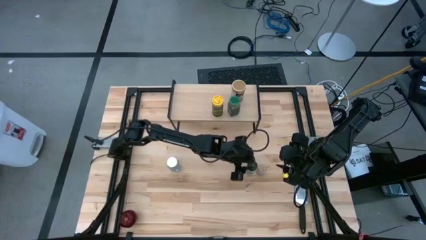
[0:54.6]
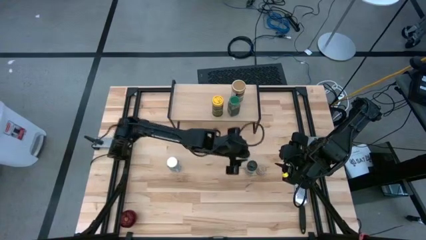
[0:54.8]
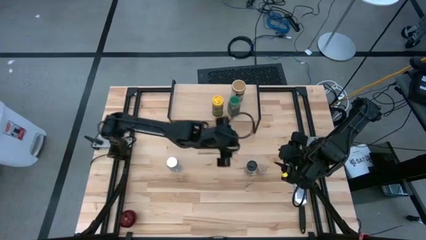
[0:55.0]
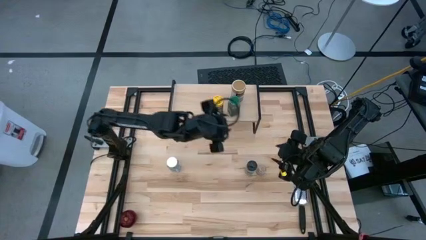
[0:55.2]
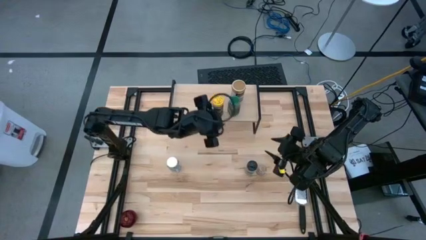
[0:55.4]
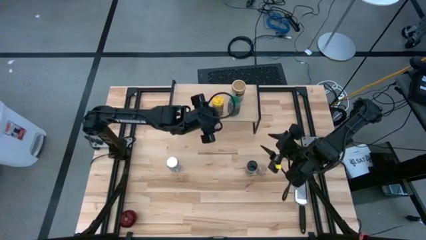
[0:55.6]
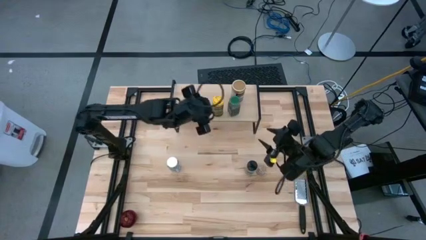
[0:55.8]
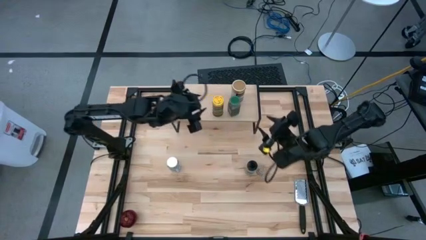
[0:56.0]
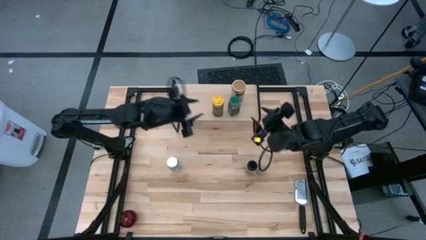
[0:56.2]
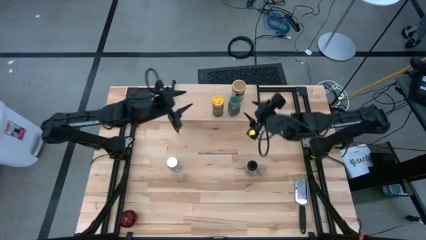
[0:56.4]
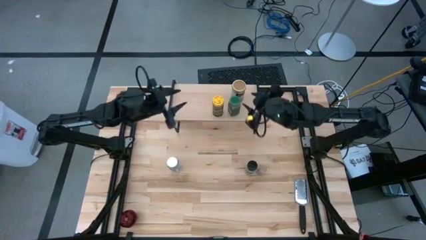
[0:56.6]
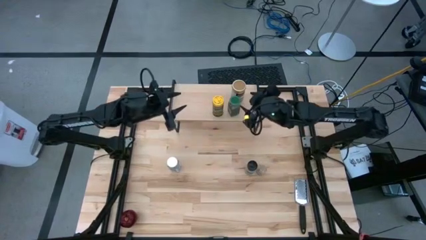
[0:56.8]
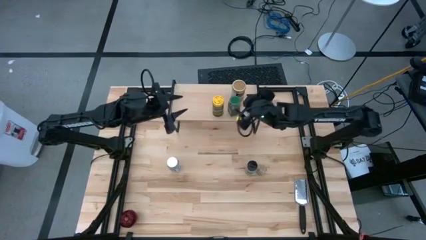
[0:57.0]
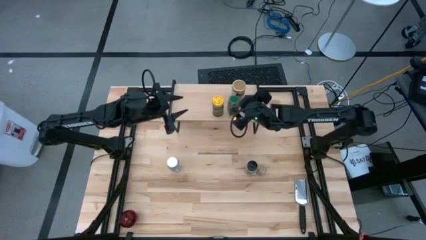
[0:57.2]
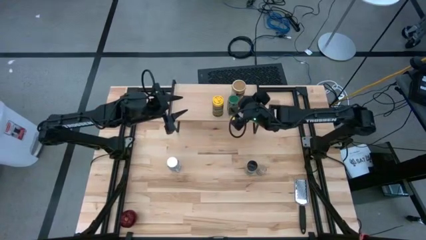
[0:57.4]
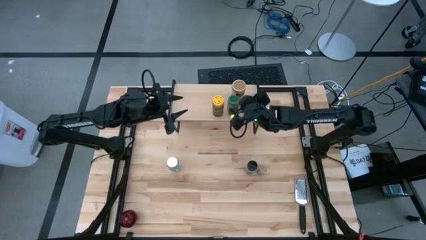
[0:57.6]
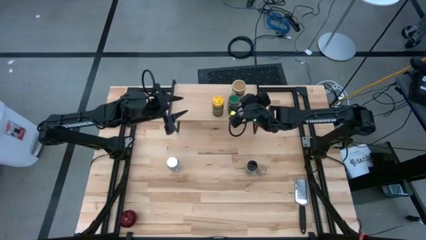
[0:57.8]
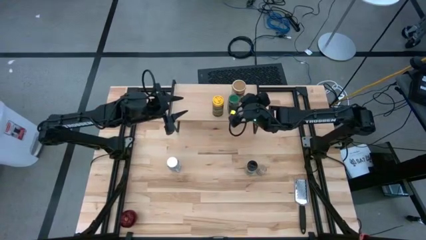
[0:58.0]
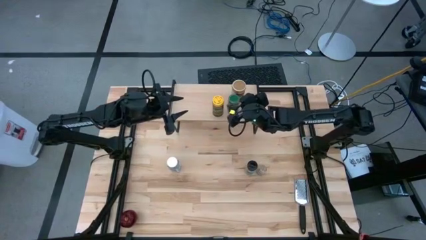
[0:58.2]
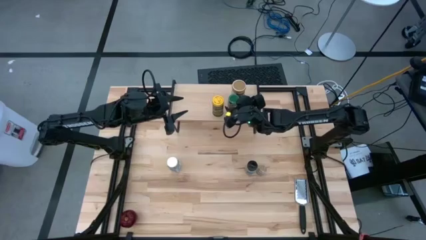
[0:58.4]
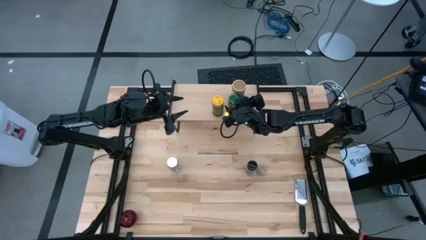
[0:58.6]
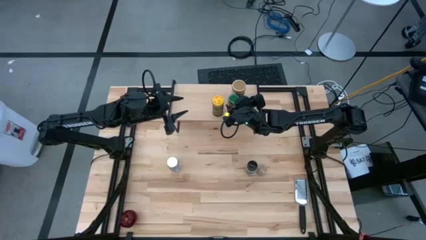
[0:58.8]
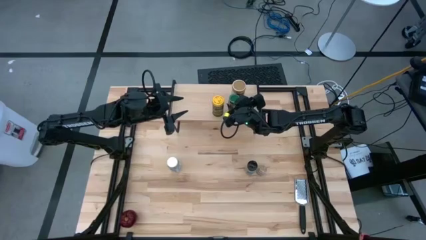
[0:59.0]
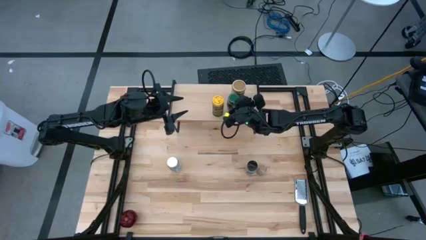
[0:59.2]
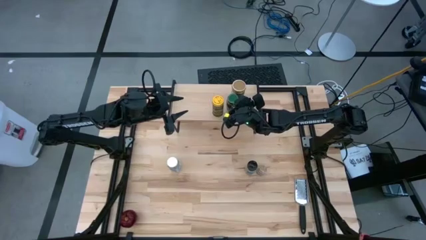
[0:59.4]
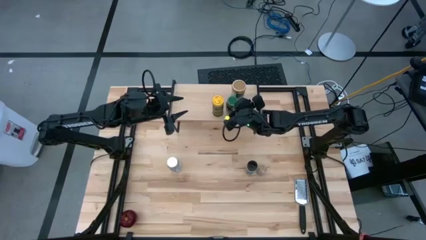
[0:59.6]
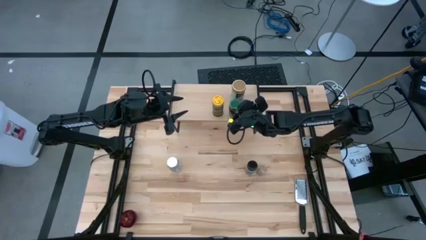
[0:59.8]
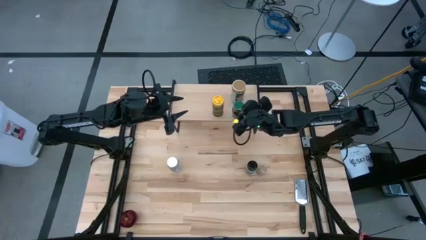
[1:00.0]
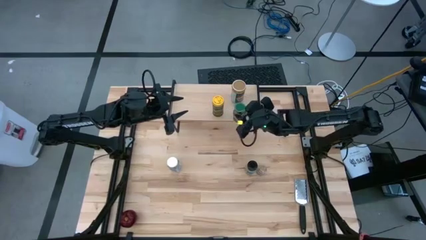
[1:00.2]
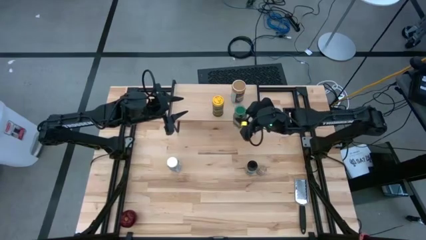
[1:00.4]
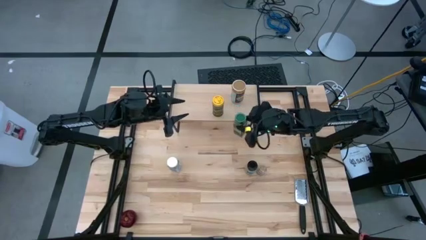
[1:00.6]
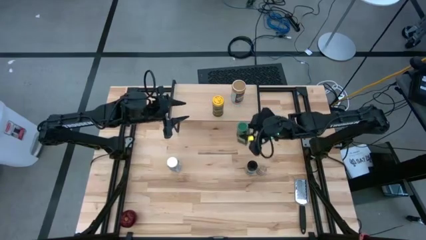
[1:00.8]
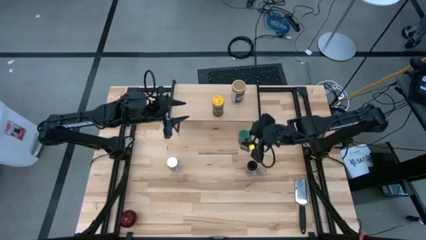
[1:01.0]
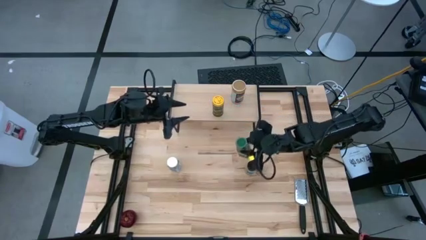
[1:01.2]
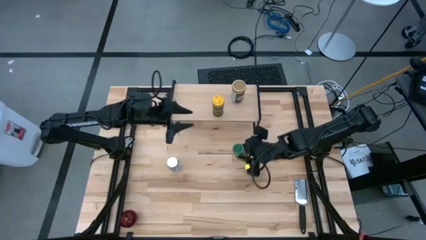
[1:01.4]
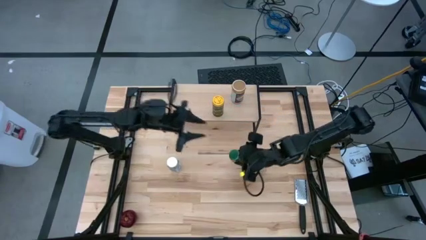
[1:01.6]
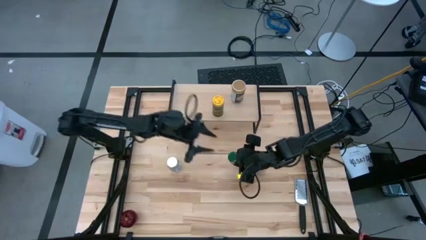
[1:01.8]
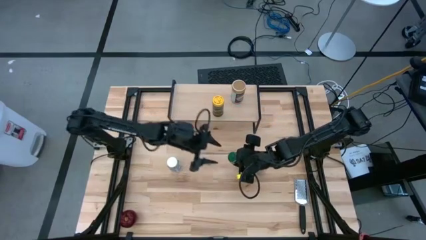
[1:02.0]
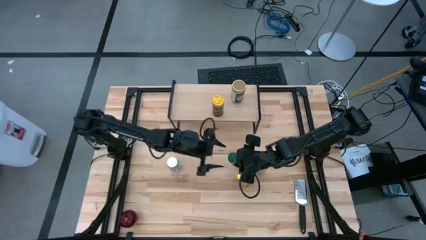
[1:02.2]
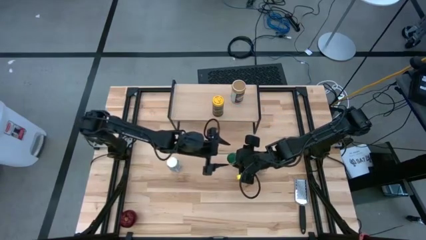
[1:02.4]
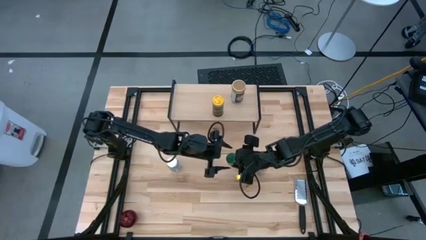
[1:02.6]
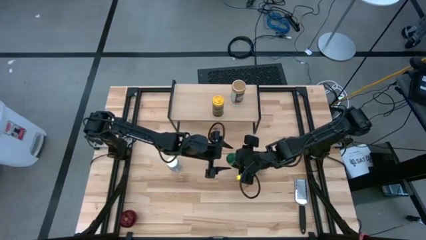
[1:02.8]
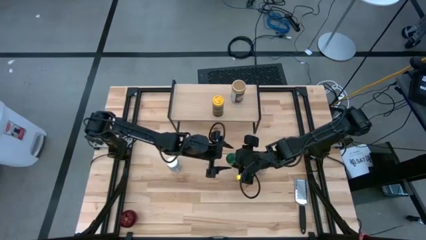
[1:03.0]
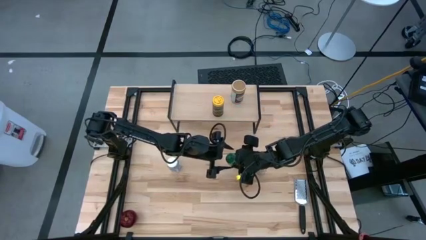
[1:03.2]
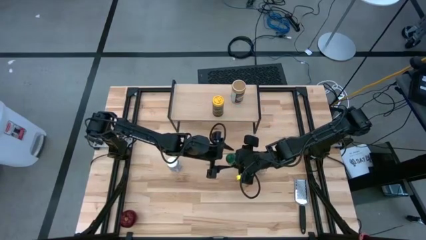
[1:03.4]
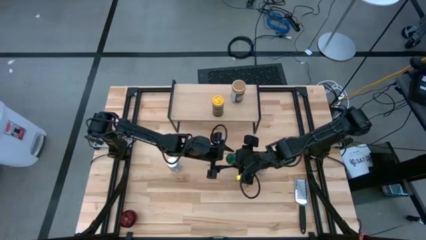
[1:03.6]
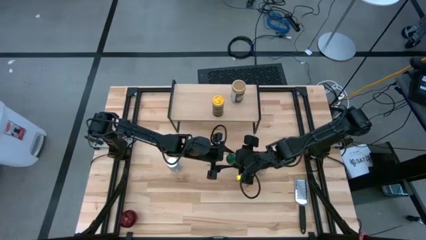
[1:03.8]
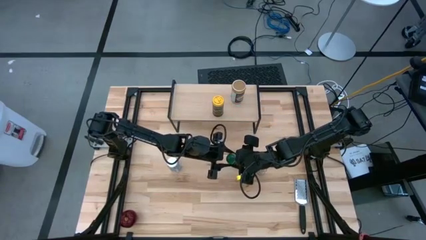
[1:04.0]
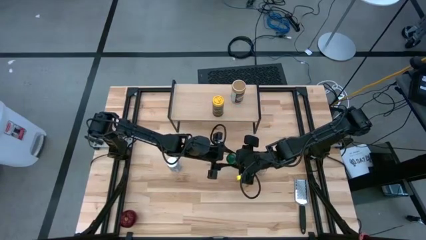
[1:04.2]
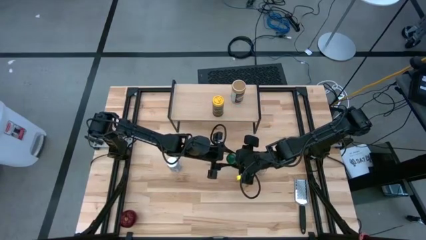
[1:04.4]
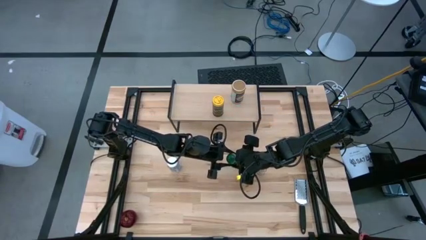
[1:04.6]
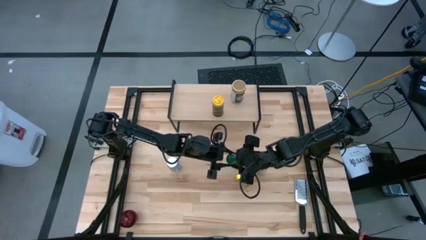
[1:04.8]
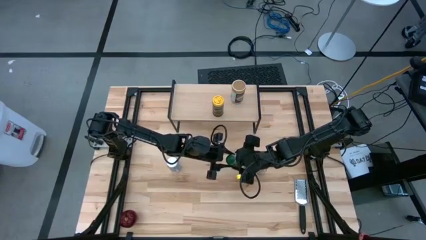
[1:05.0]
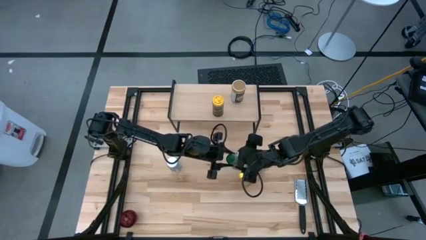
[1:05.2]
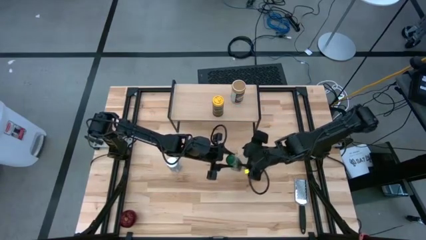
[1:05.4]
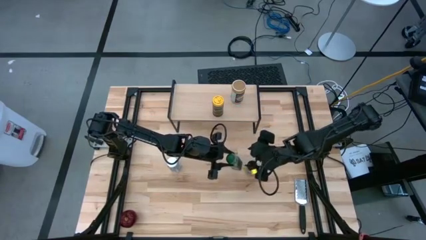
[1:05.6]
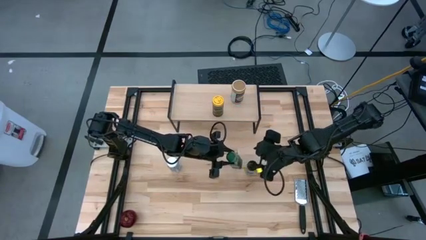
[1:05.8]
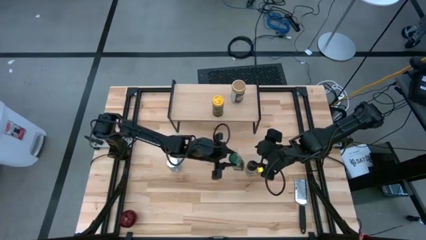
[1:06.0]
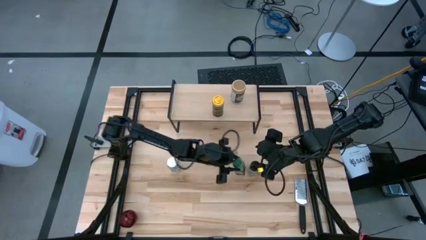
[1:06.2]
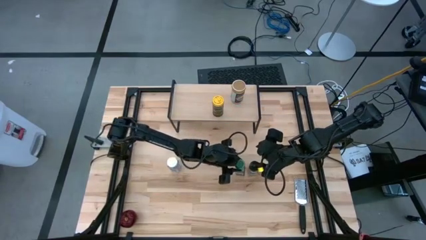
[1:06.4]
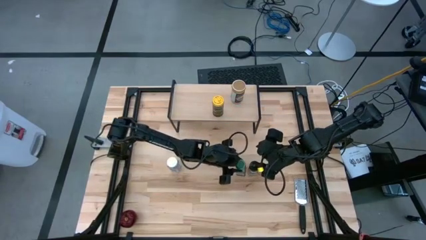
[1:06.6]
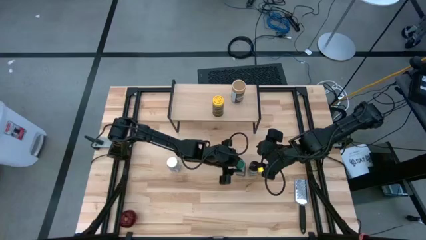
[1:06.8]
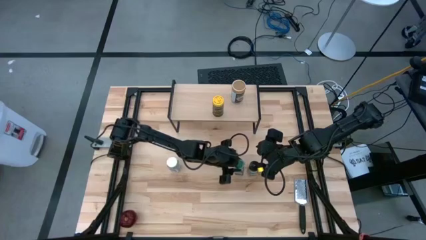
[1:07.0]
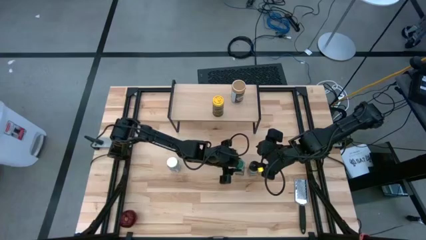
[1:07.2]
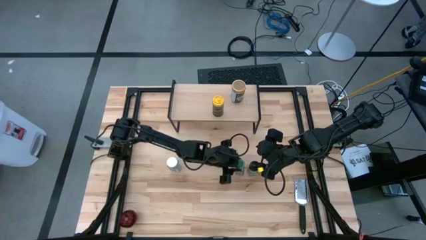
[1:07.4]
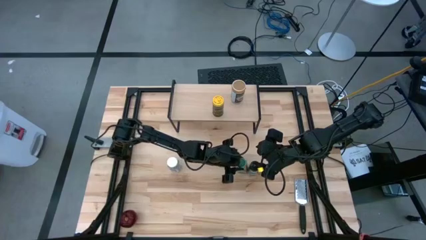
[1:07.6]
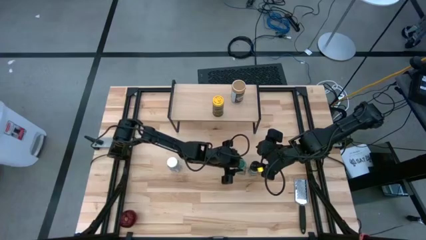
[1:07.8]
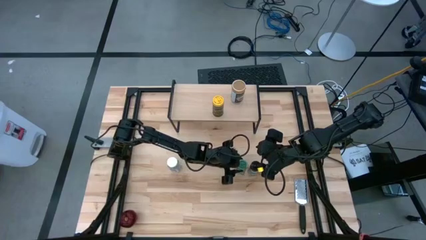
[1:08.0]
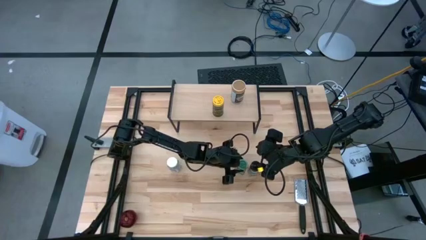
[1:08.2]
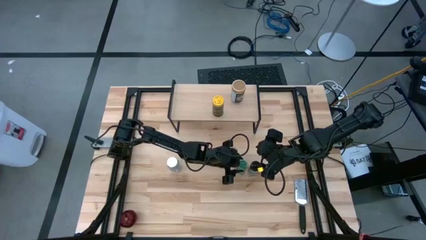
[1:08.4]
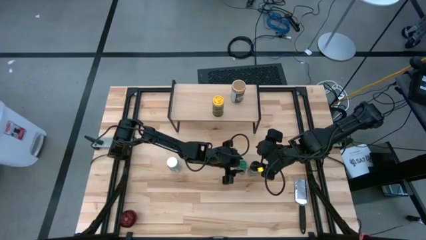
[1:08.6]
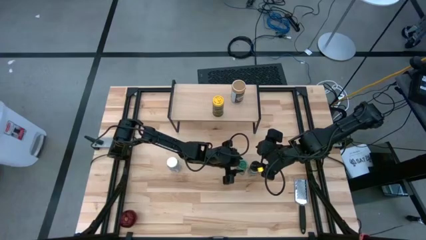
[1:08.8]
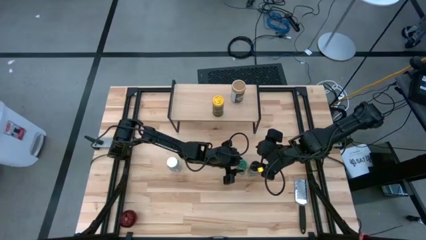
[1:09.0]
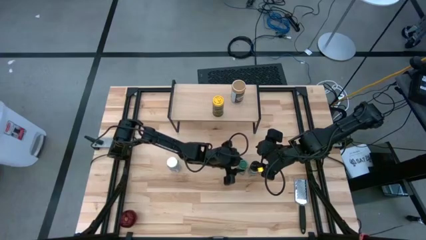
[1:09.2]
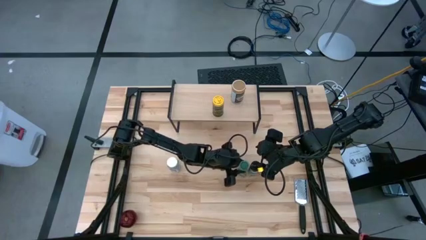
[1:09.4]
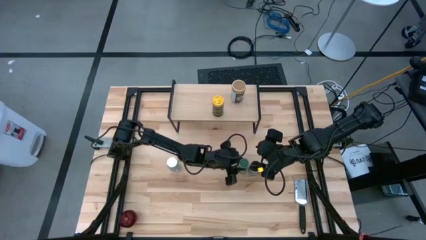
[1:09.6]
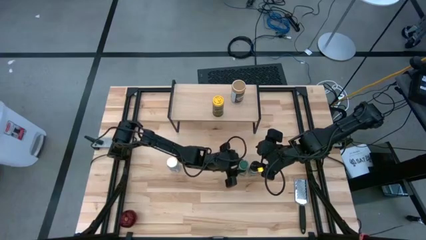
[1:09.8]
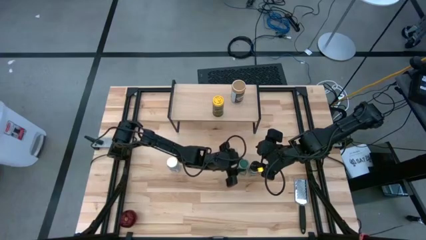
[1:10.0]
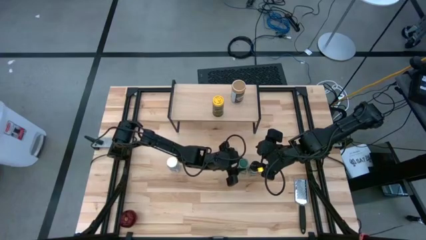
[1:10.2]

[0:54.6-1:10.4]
Task: Shelf spices
Remove the green seasoning bottle from the shelf
